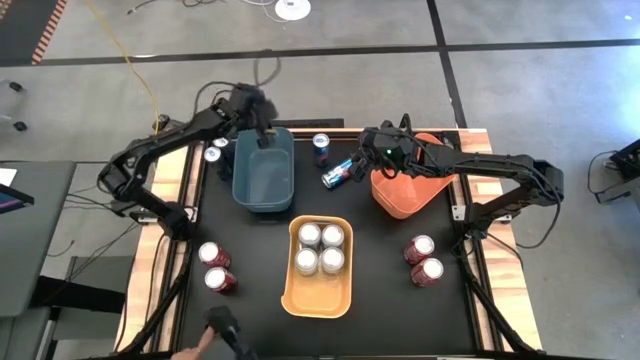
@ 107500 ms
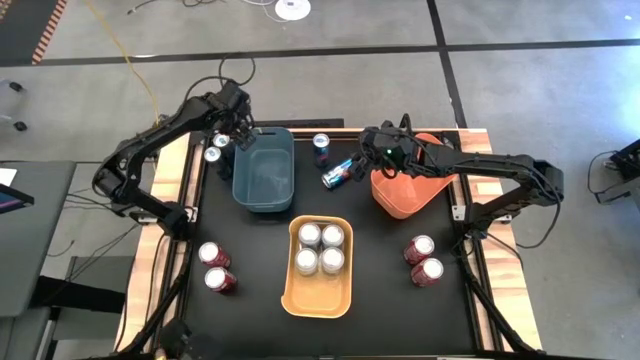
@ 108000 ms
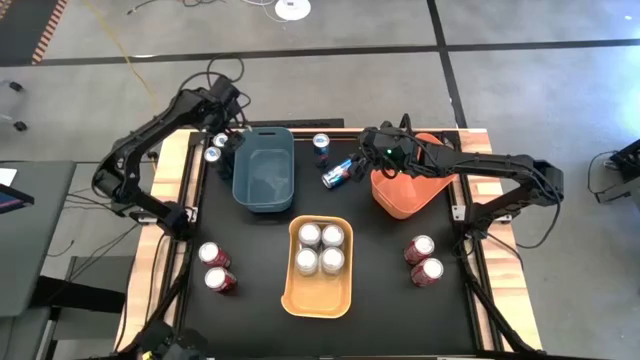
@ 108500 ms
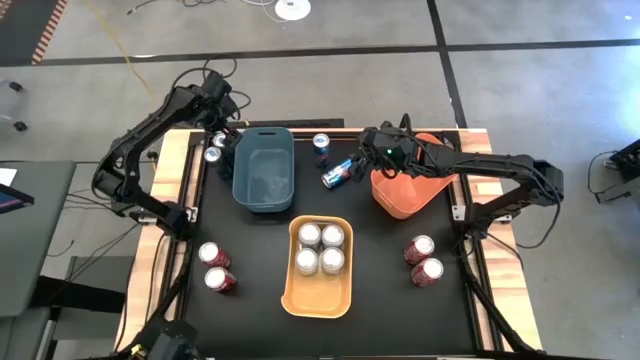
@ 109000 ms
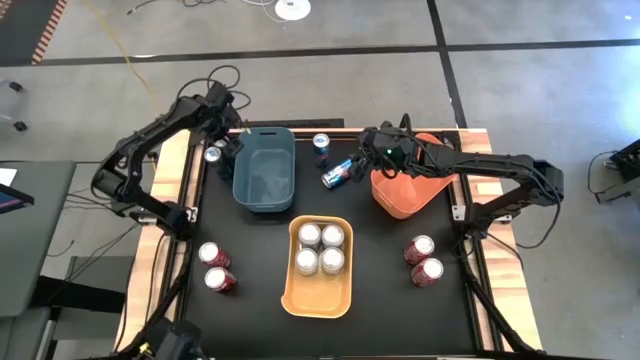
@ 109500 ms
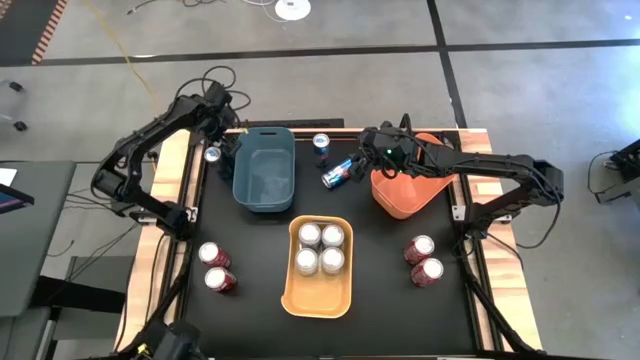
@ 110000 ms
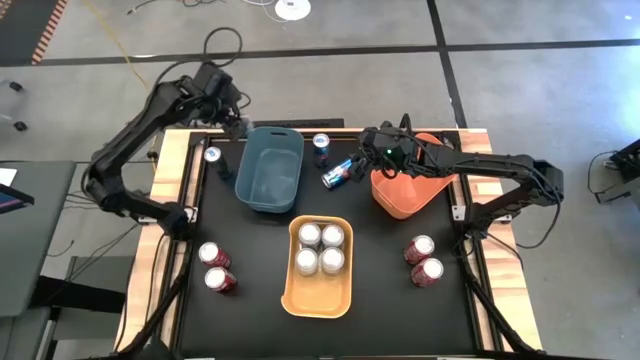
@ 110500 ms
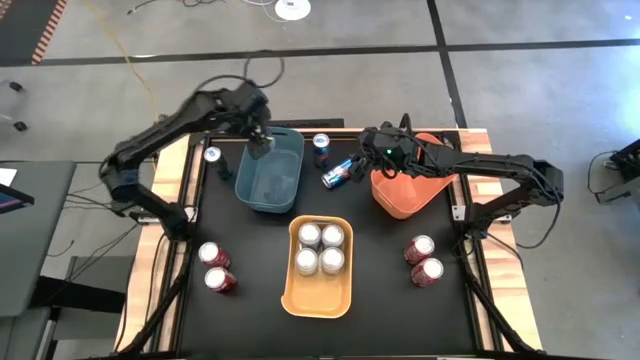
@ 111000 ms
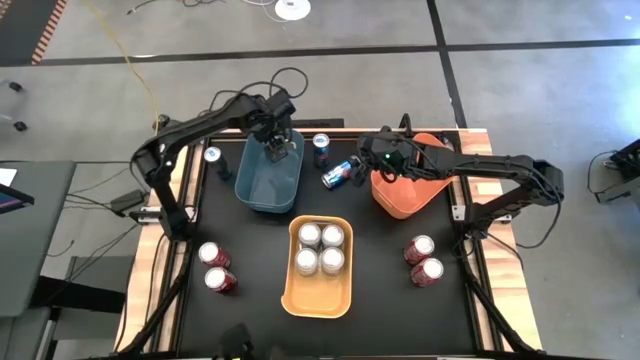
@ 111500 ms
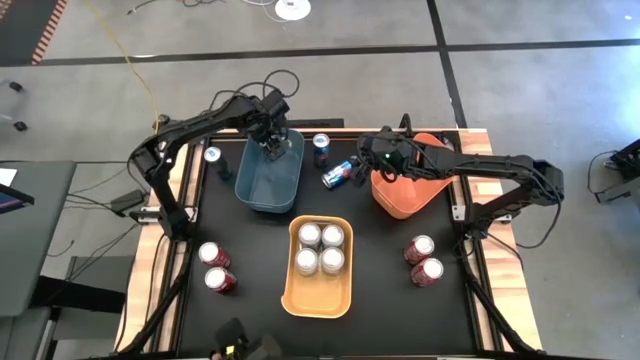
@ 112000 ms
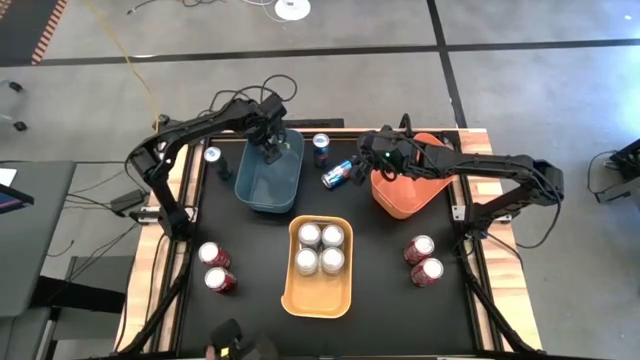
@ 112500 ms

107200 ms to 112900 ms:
Task: Sort soda cans
Put the blue soda can into the blue bin

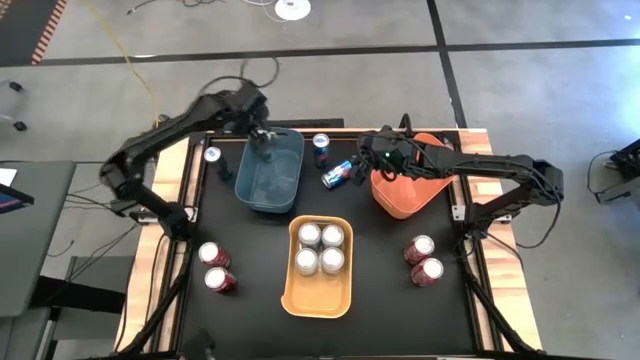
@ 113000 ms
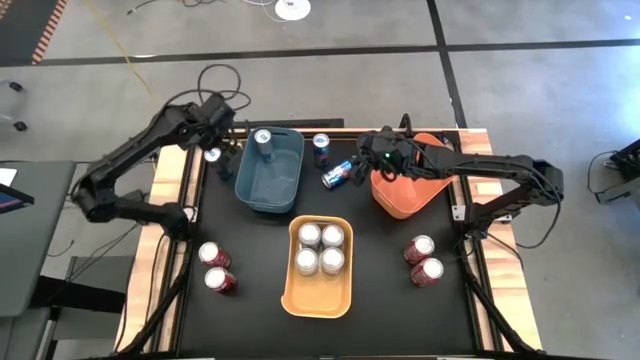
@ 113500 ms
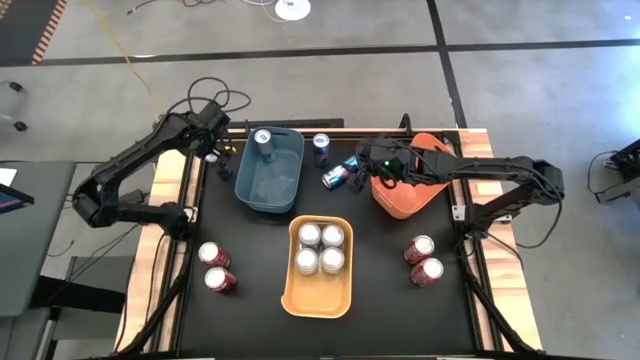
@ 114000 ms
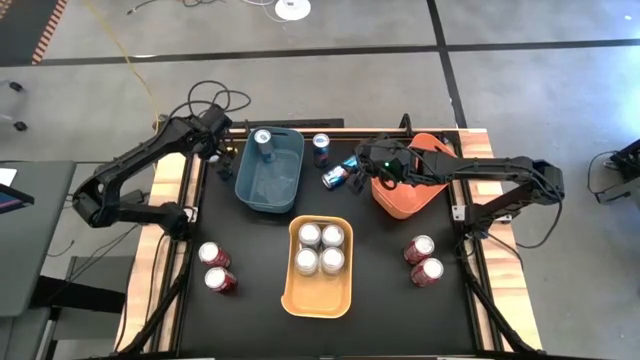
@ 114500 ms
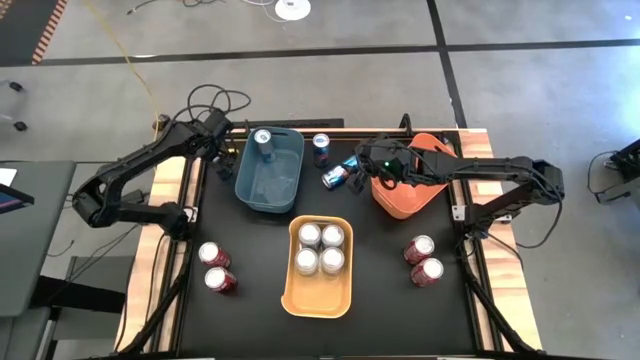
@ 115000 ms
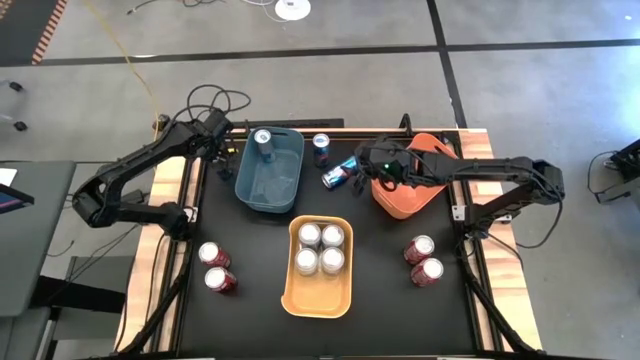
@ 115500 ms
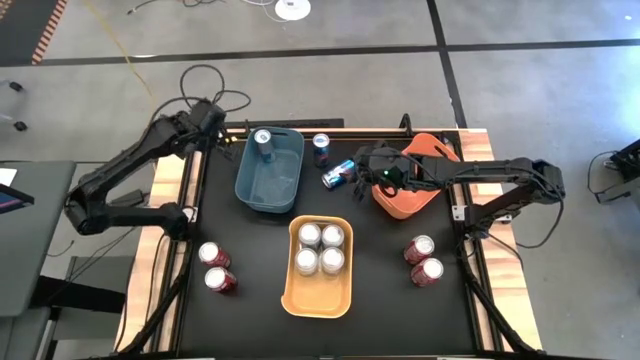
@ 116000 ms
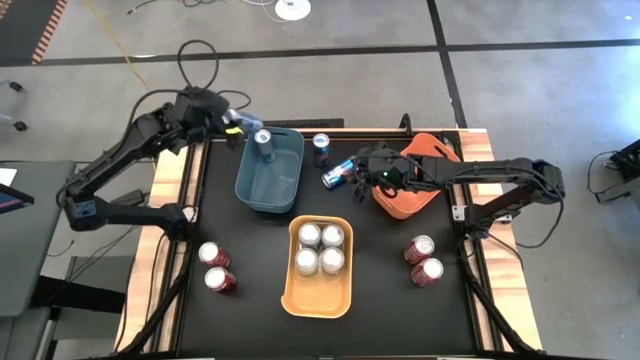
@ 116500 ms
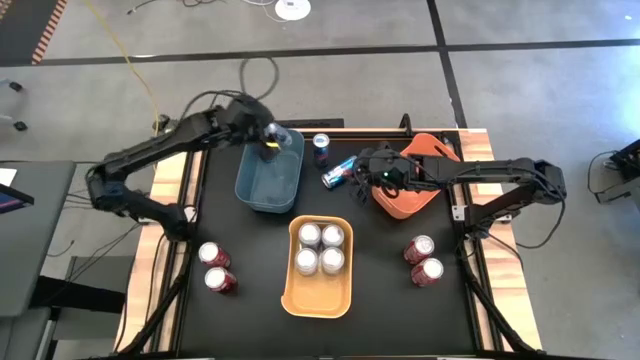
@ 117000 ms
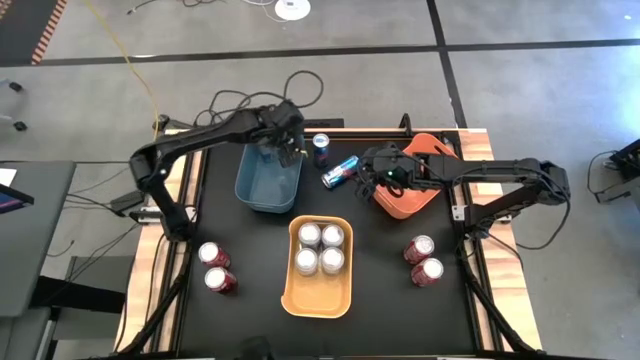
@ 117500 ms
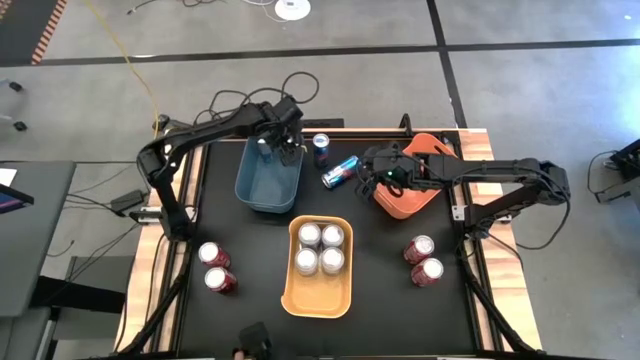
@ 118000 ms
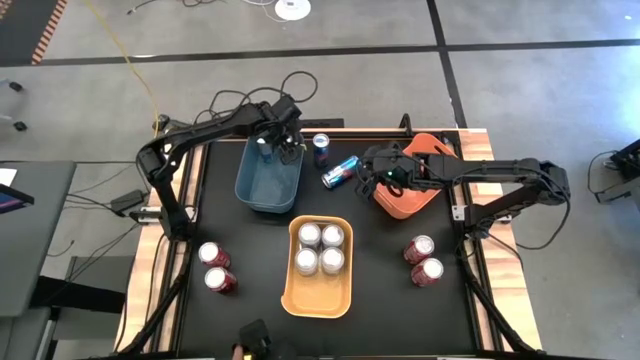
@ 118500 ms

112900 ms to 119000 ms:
Put the blue soda can into the blue bin

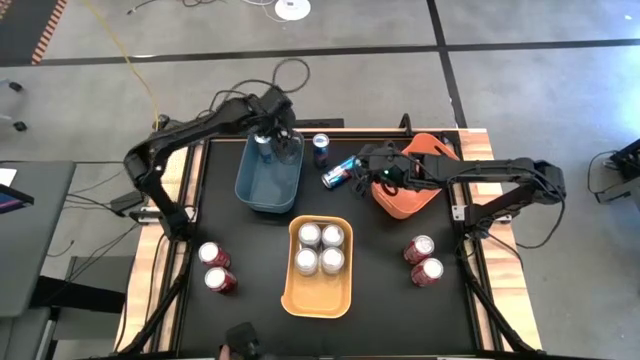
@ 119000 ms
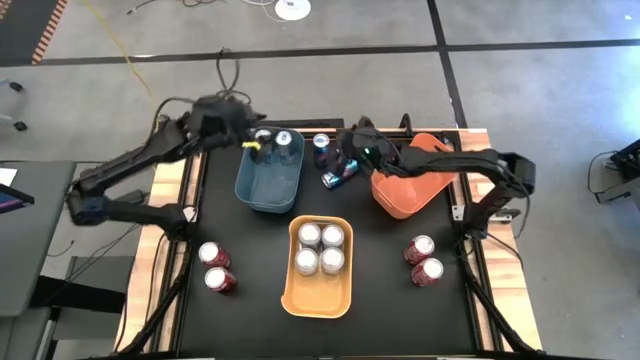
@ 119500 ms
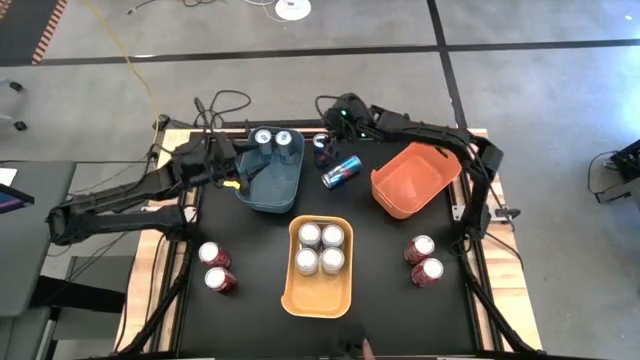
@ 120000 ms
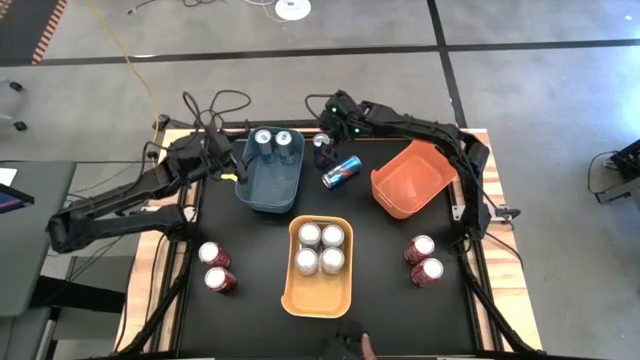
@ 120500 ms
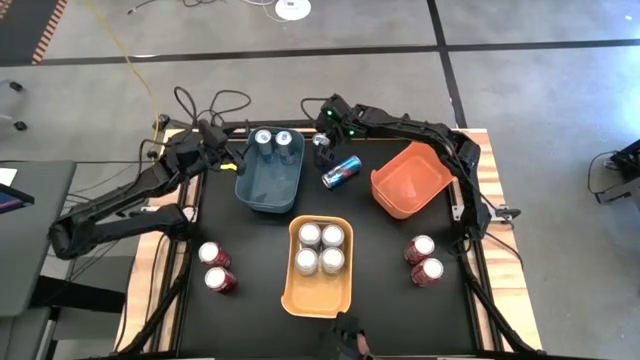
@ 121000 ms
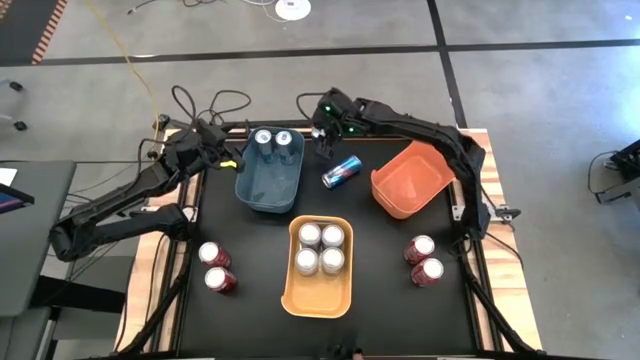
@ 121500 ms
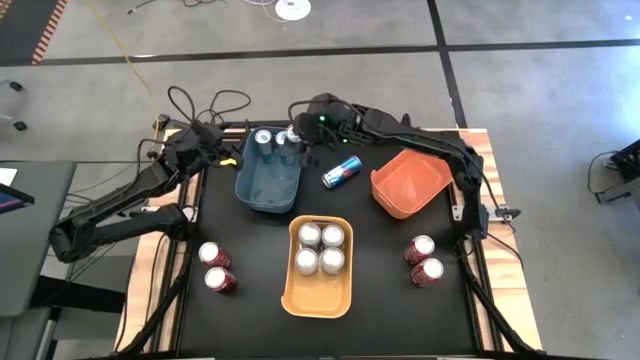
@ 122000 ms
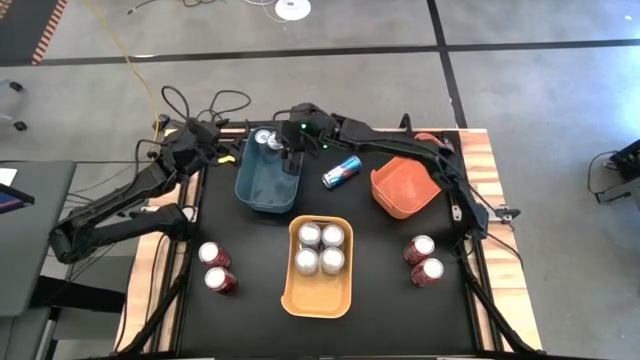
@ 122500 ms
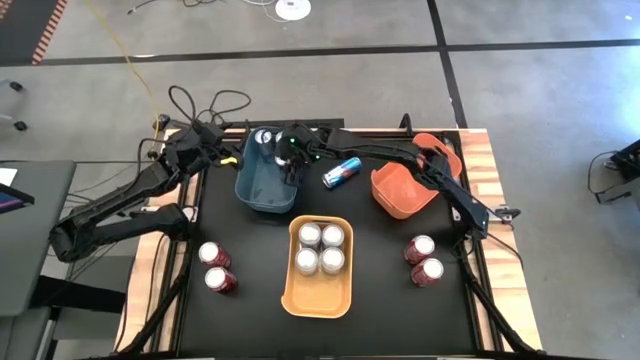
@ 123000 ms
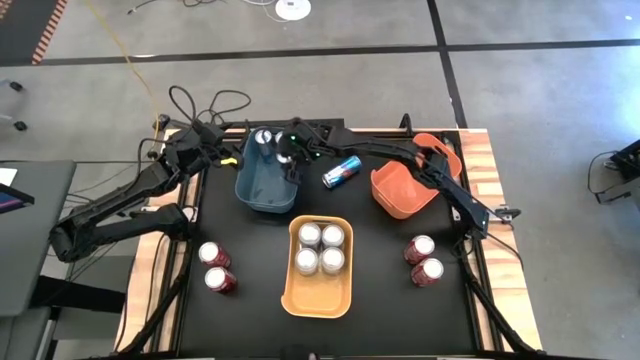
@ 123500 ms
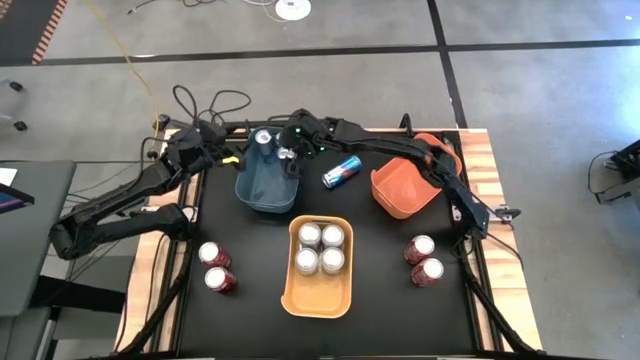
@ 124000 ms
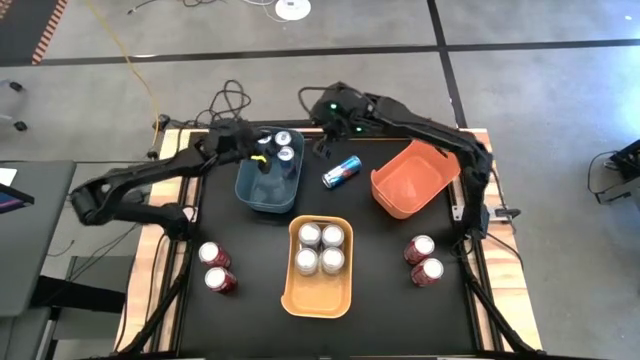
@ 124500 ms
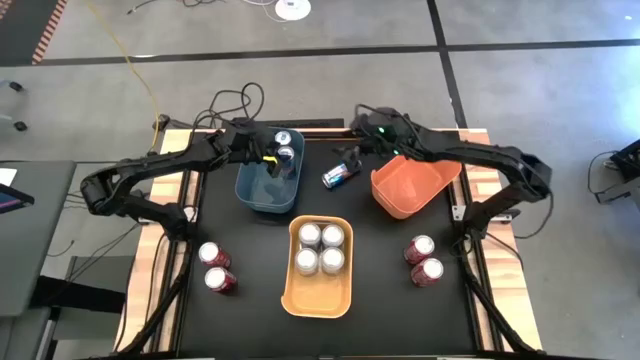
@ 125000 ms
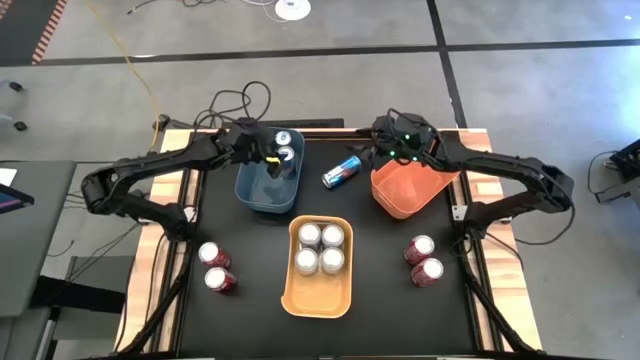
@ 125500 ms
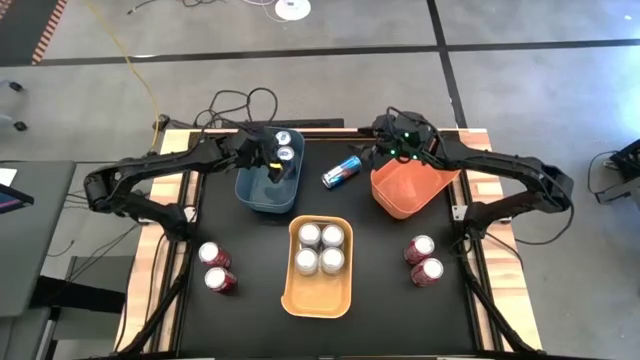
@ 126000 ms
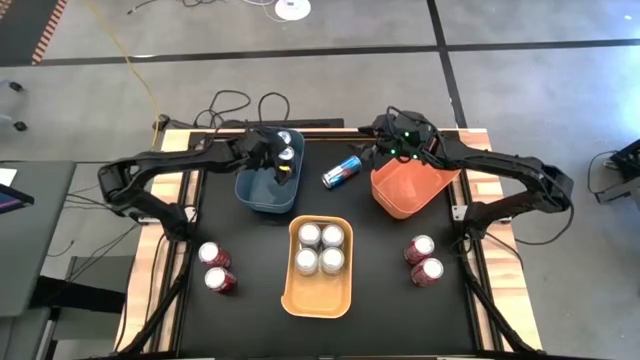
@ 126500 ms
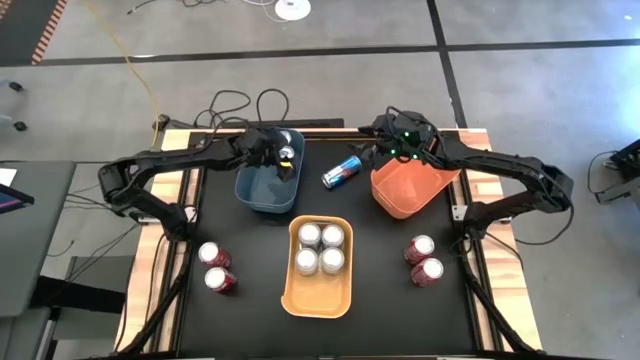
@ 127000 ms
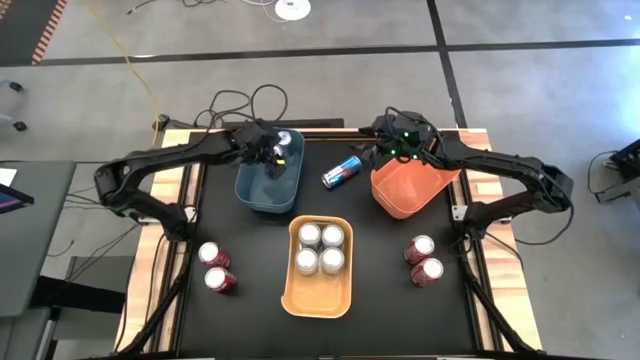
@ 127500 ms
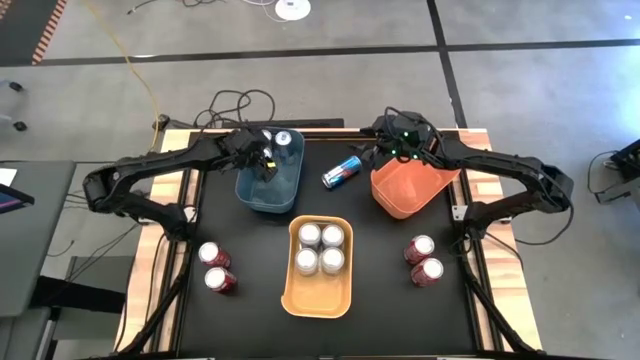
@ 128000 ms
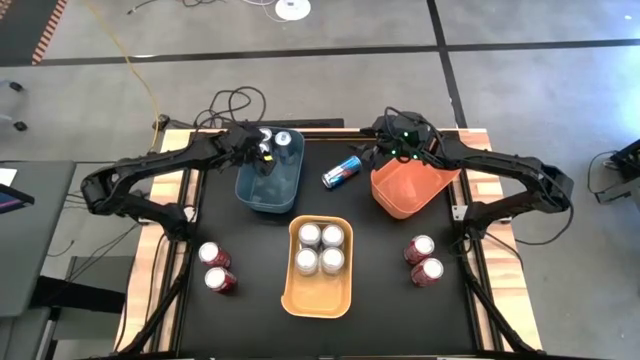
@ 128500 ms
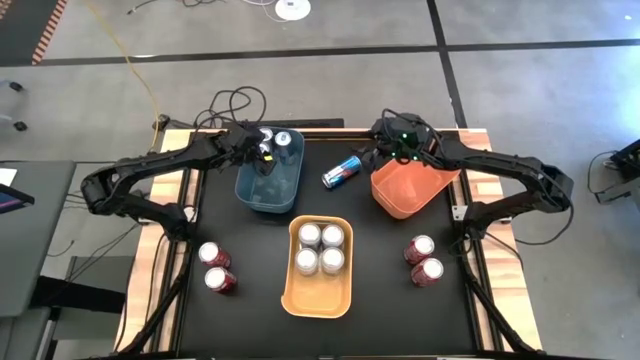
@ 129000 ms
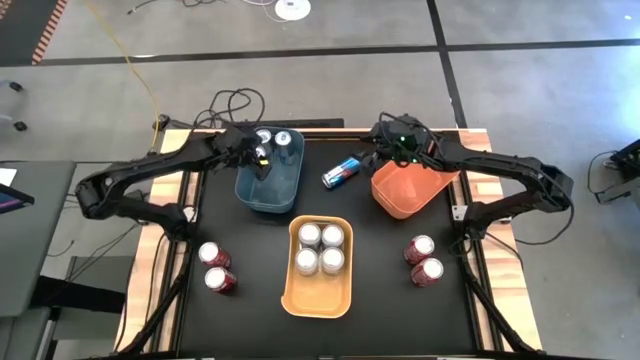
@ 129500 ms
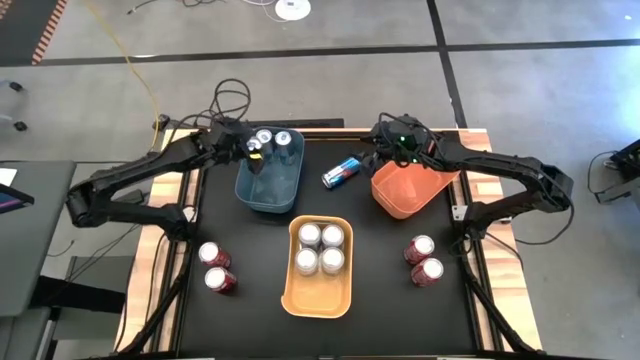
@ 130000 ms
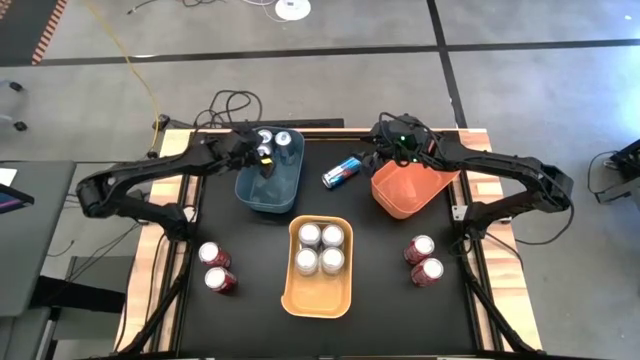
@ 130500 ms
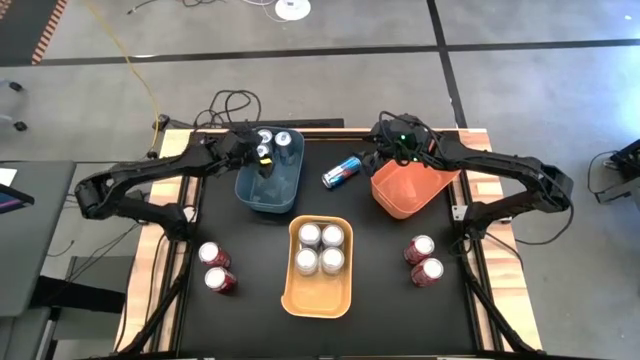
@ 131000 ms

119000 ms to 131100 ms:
Put the blue soda can into the blue bin
